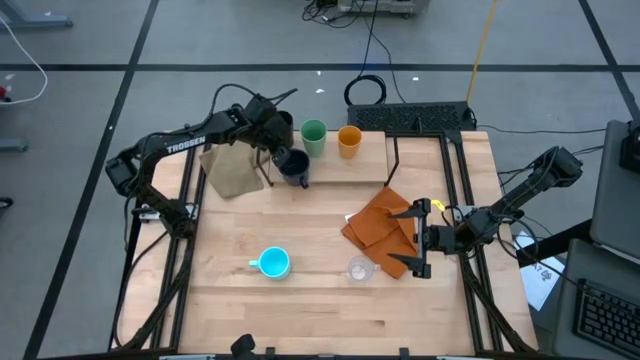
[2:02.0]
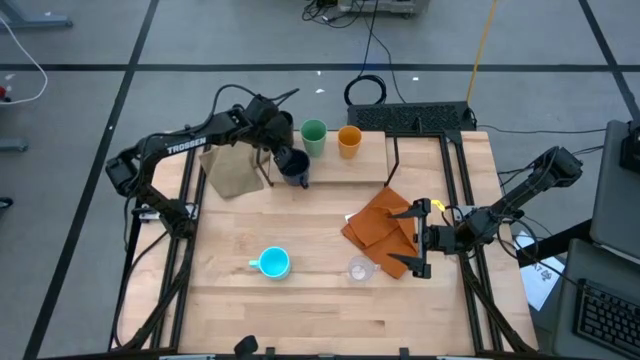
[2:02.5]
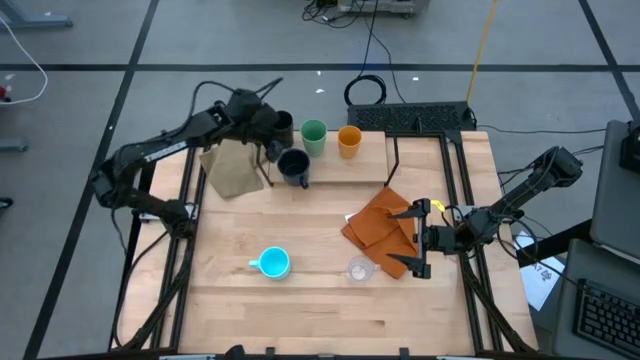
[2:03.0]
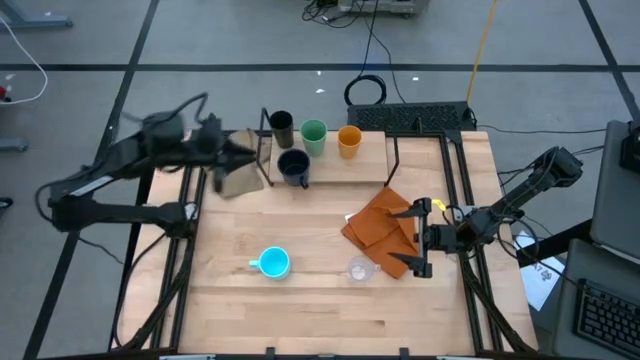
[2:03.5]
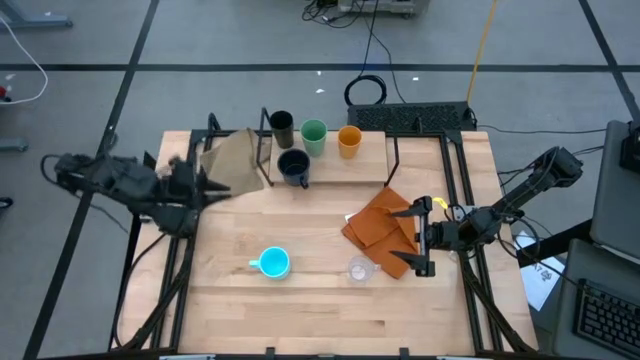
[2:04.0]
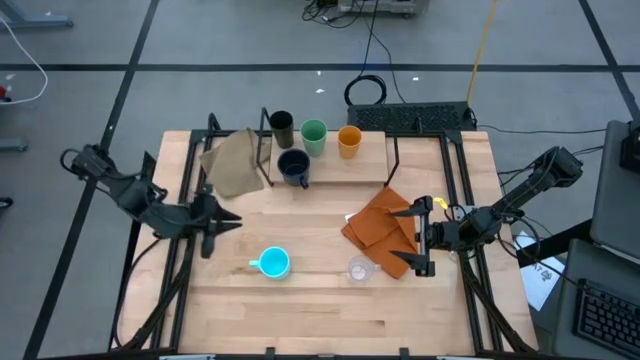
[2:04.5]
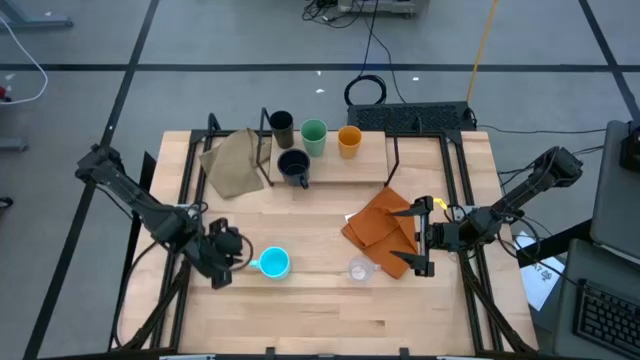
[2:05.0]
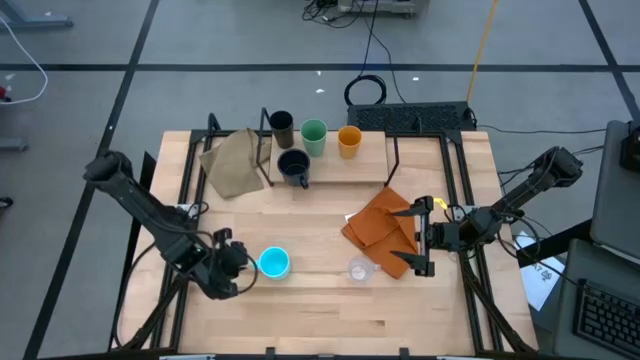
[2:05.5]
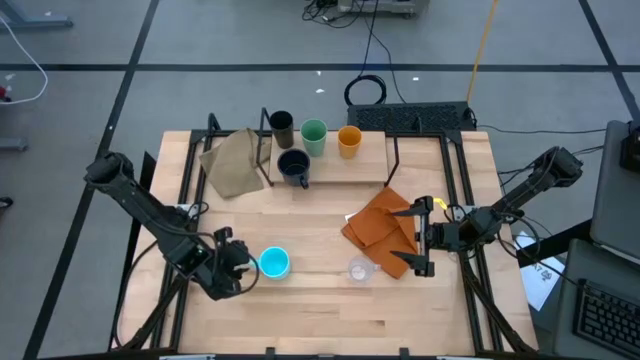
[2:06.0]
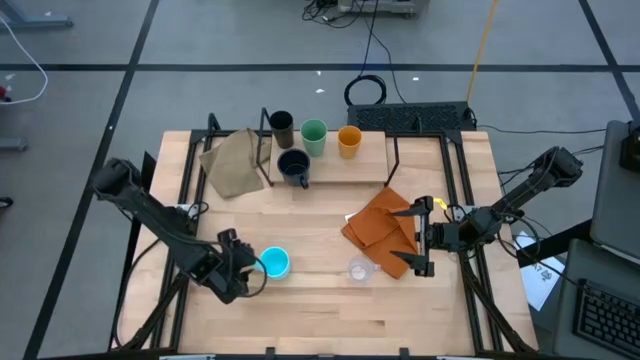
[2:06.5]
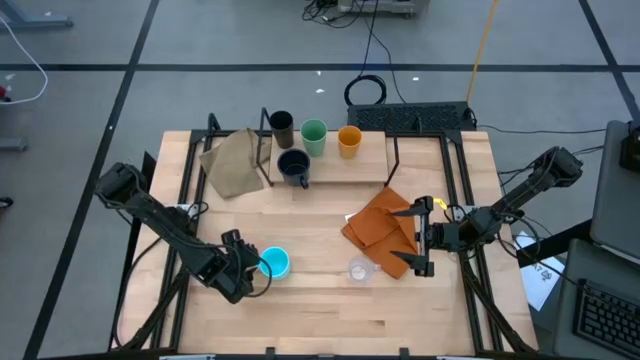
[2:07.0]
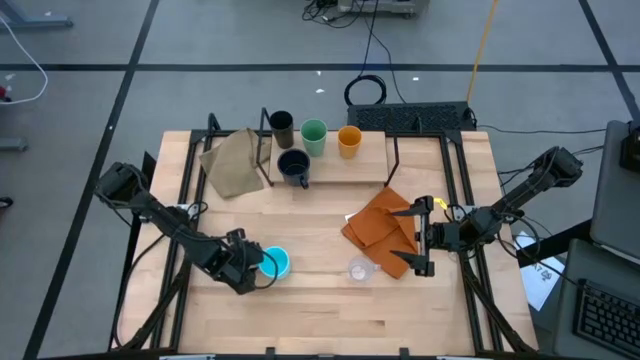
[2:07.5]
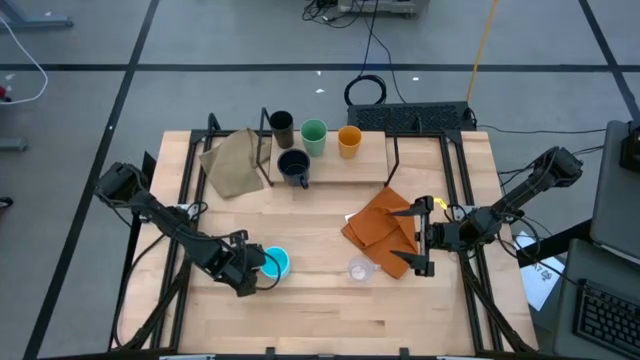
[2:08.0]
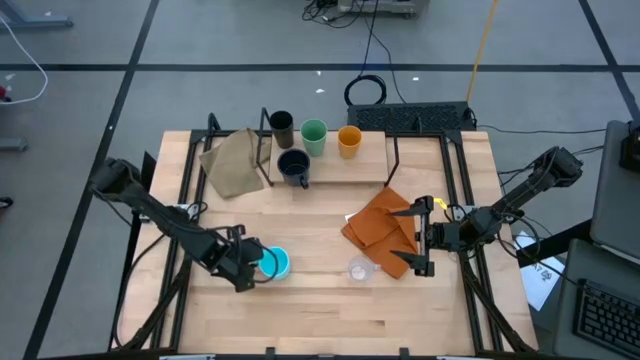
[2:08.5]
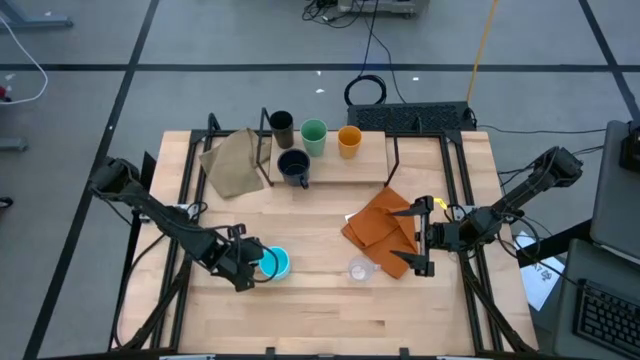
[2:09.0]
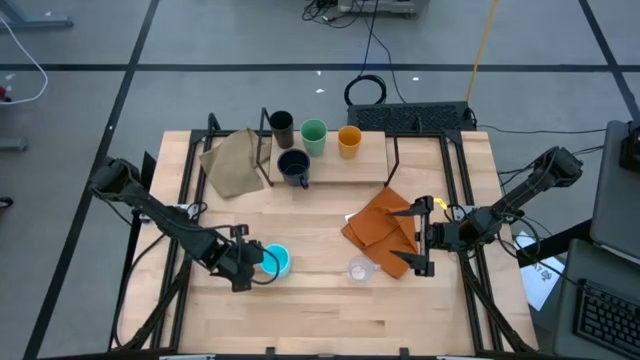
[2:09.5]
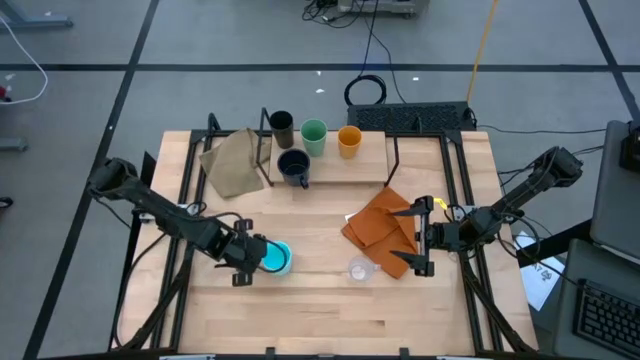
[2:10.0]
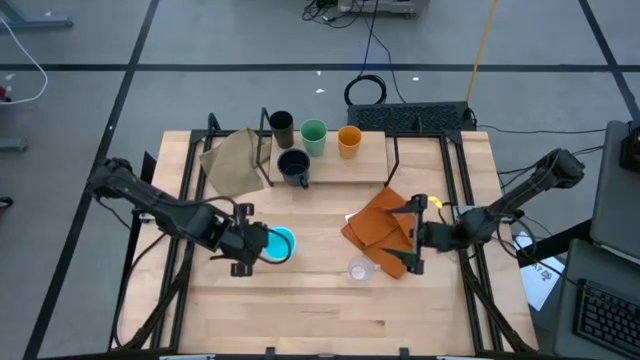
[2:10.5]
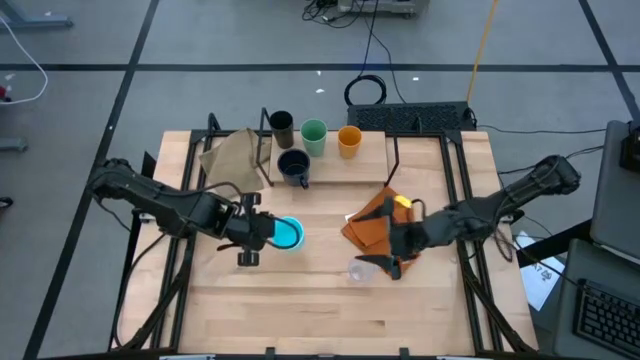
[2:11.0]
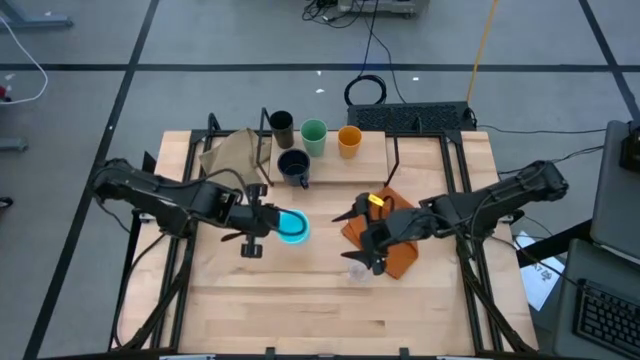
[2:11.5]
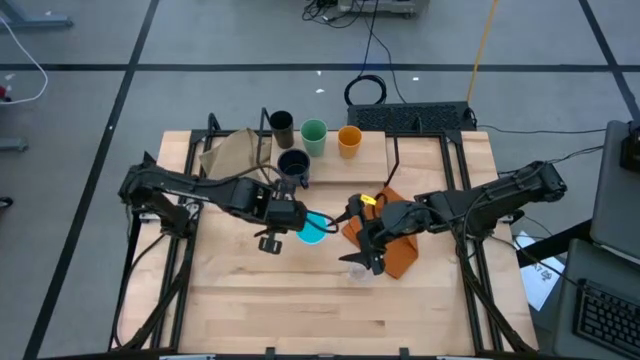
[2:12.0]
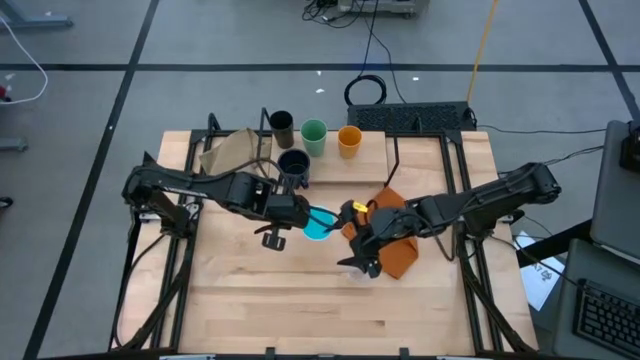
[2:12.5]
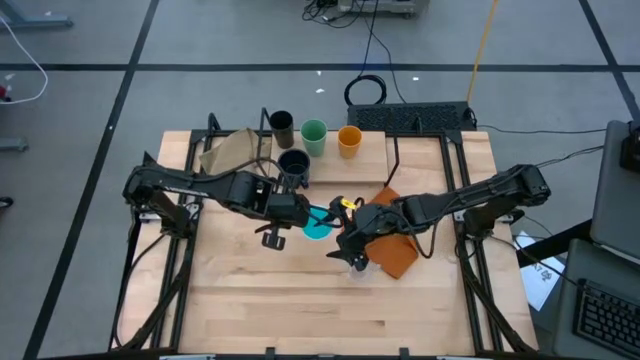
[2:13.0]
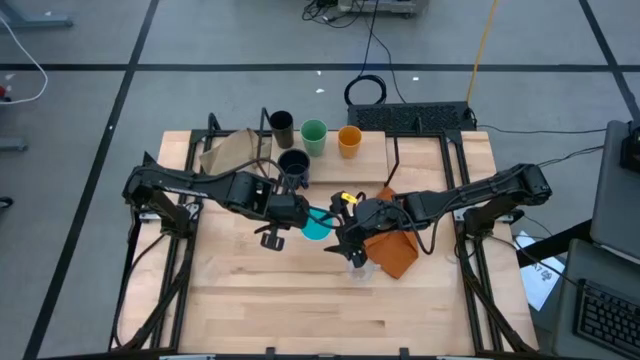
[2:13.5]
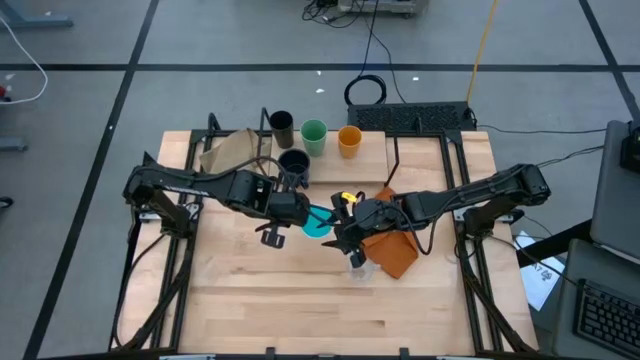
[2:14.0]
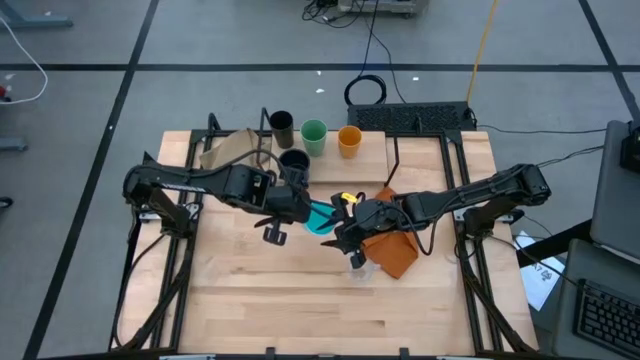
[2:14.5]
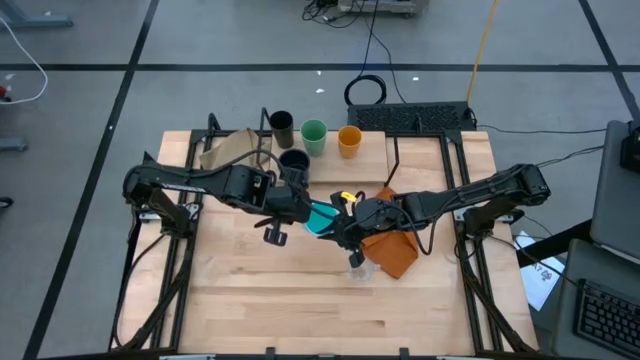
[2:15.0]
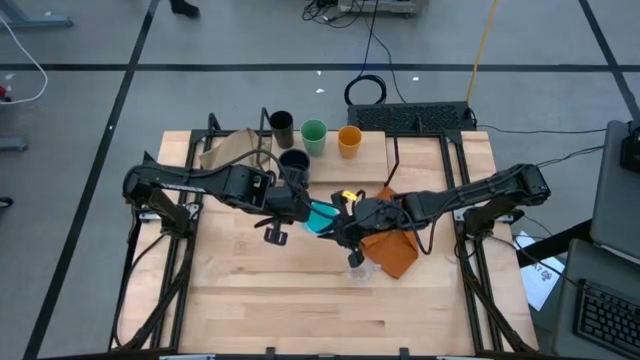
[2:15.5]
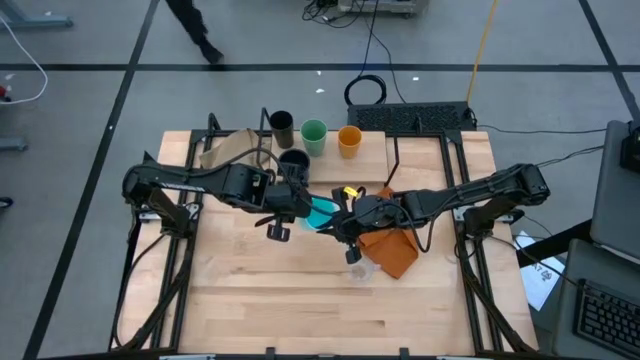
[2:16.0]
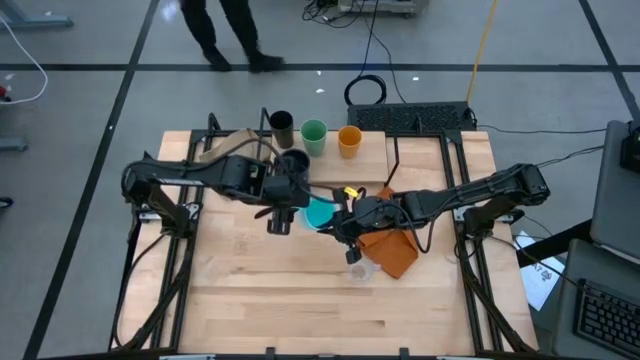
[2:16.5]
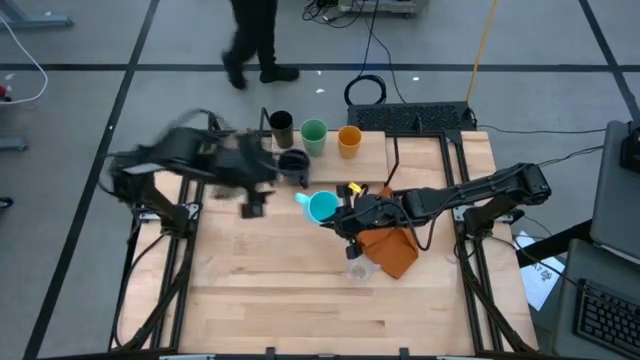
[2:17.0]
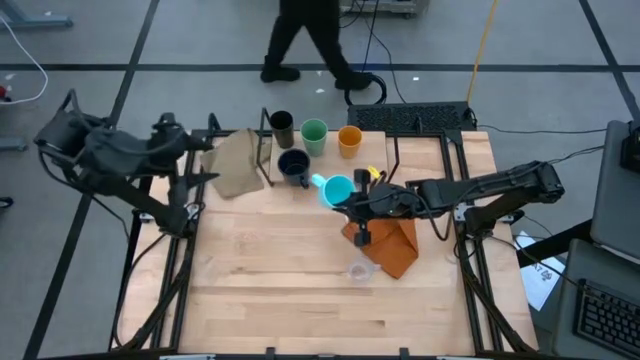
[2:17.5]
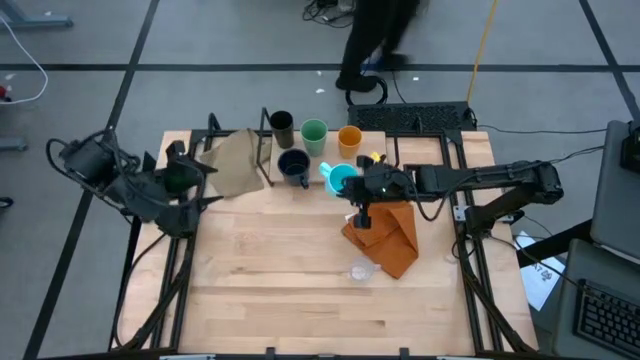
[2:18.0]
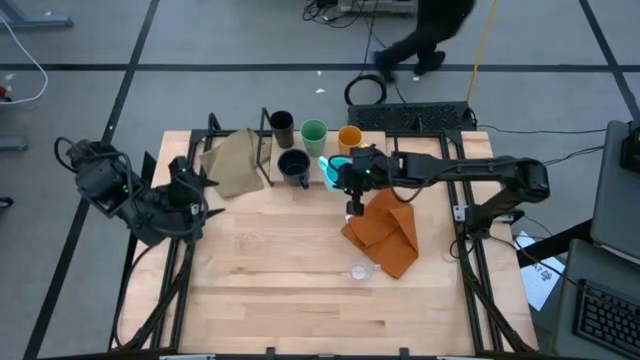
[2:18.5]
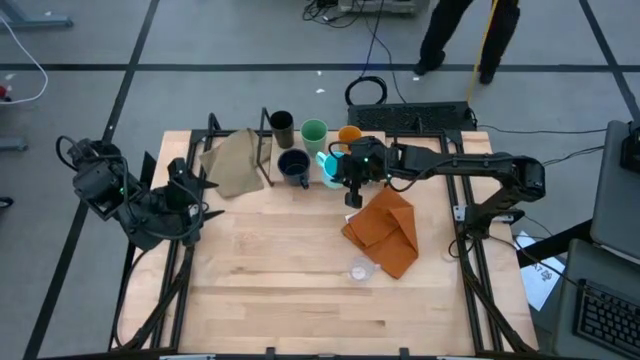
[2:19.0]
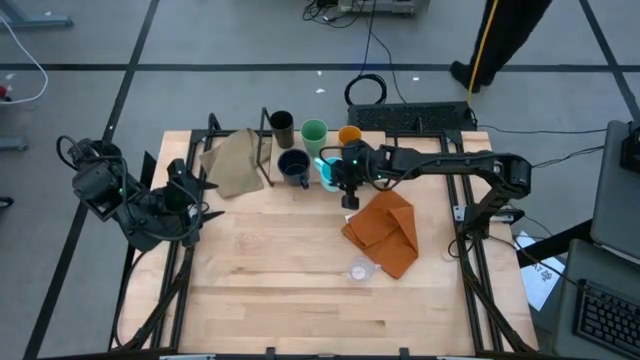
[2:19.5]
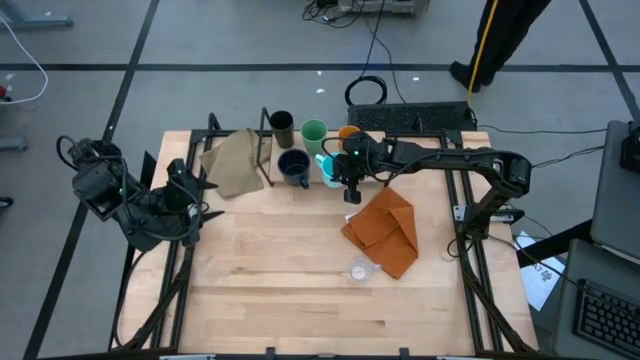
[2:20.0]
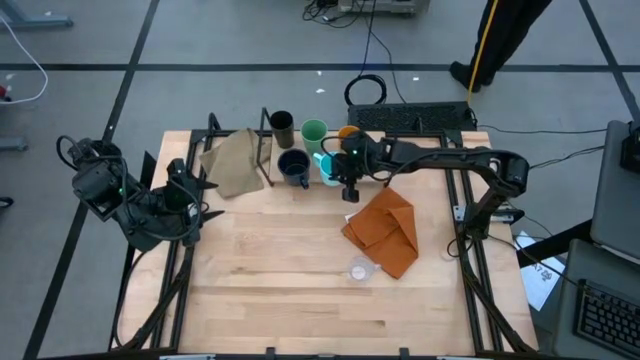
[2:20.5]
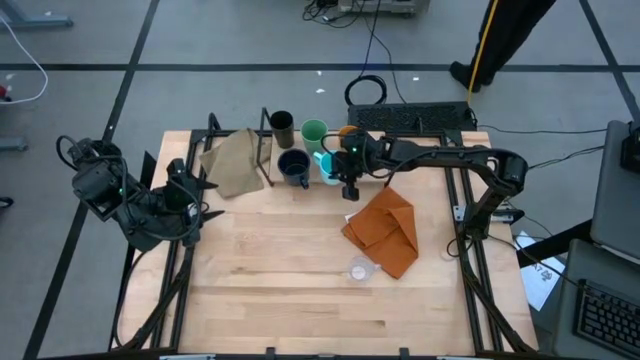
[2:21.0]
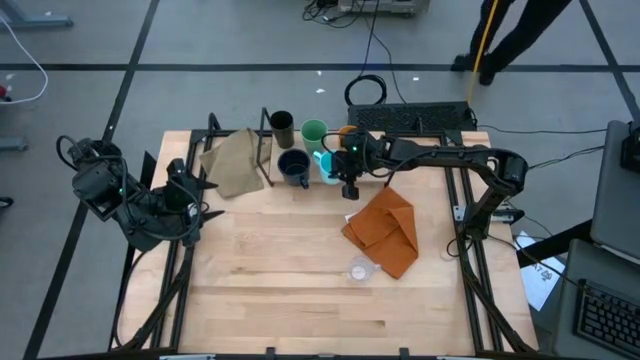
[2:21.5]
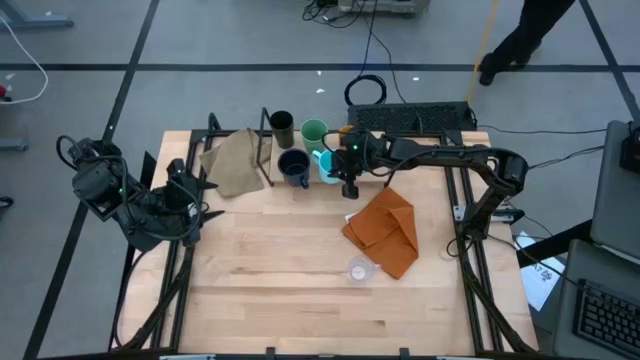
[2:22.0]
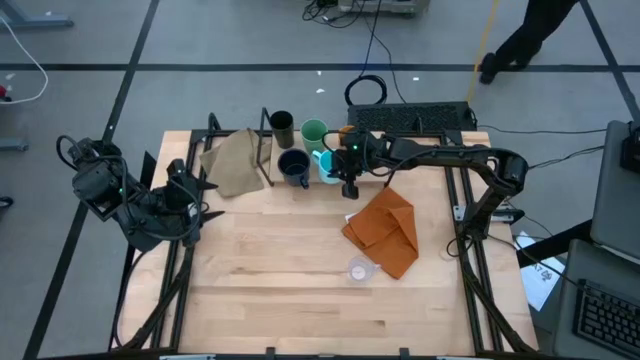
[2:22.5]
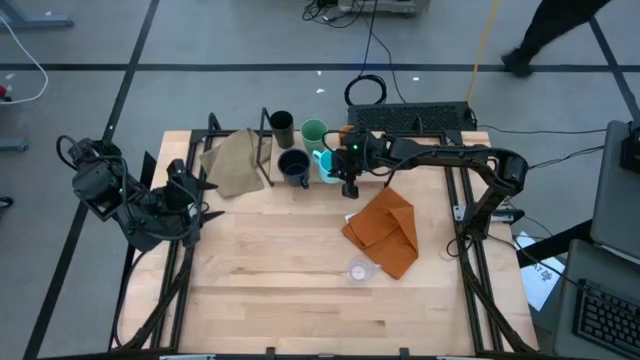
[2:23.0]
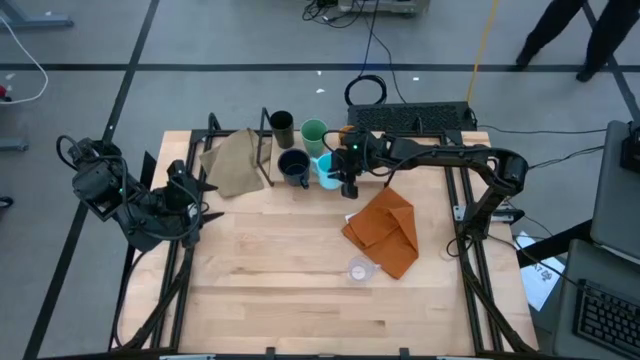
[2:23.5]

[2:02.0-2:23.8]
Task: Stack small to large cups/mugs on shelf
Put the light blue mug on the shelf
